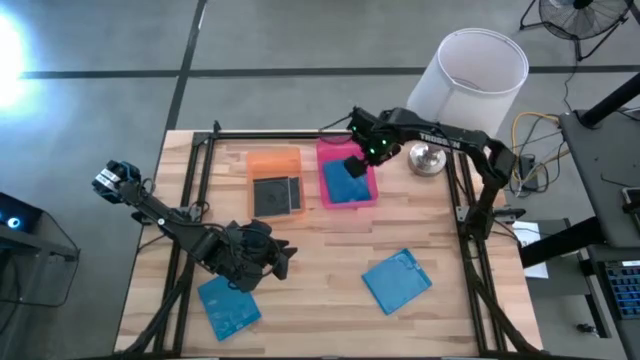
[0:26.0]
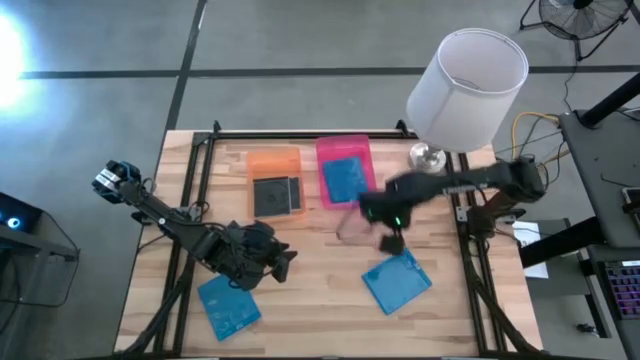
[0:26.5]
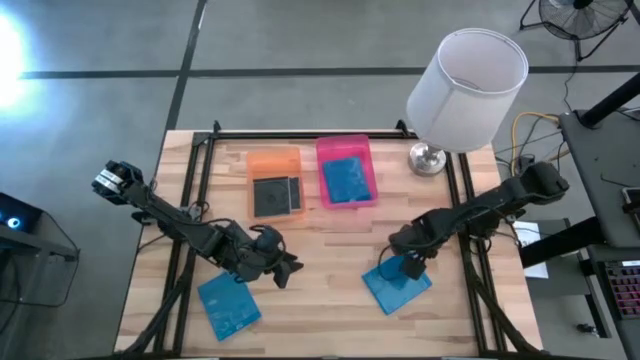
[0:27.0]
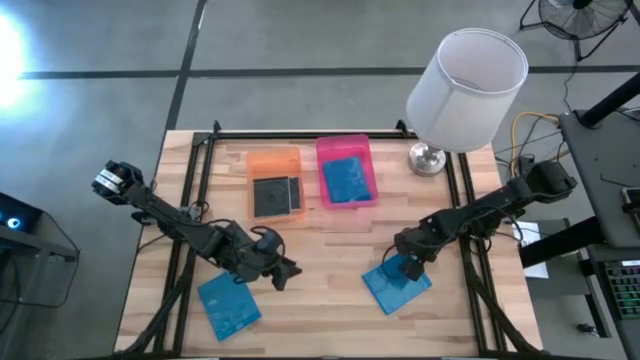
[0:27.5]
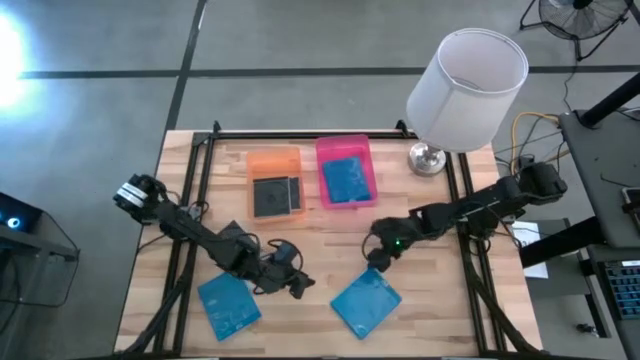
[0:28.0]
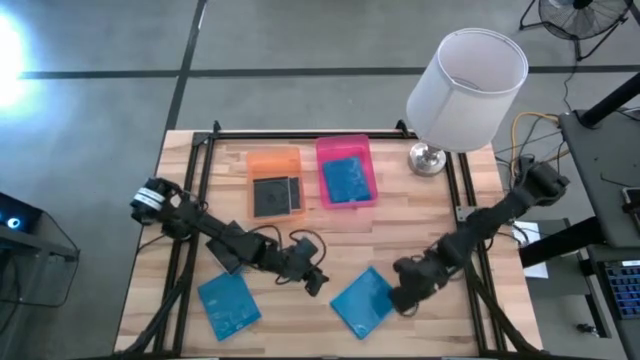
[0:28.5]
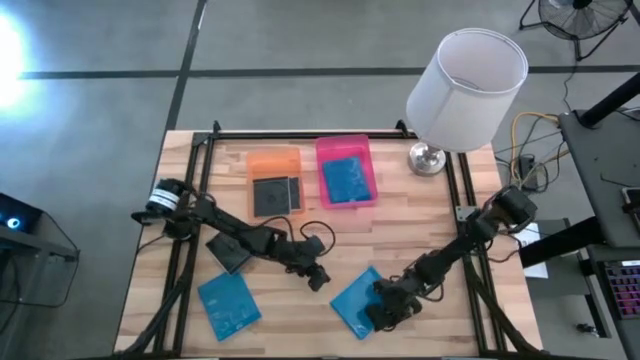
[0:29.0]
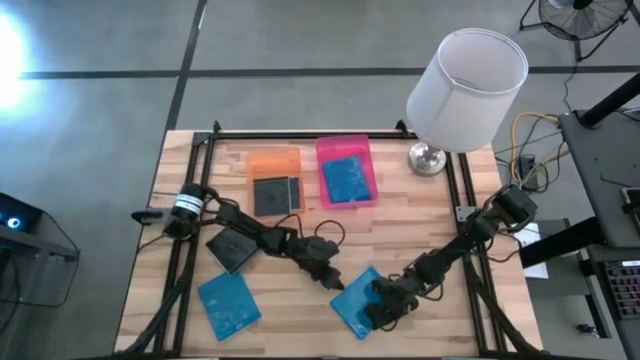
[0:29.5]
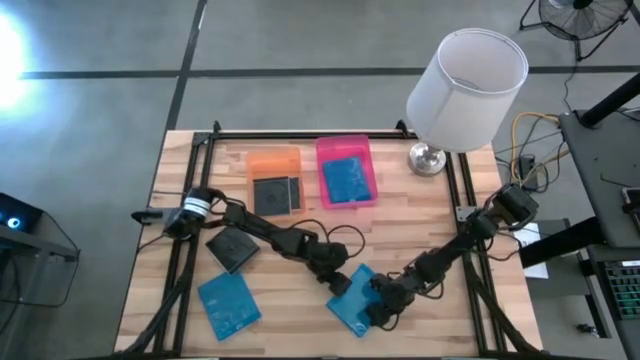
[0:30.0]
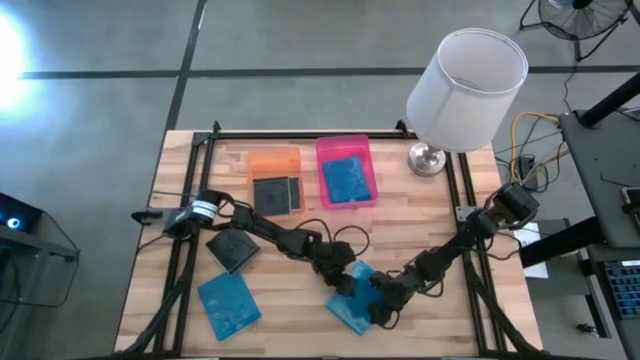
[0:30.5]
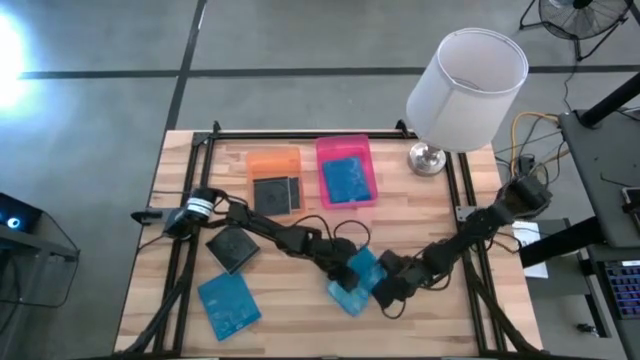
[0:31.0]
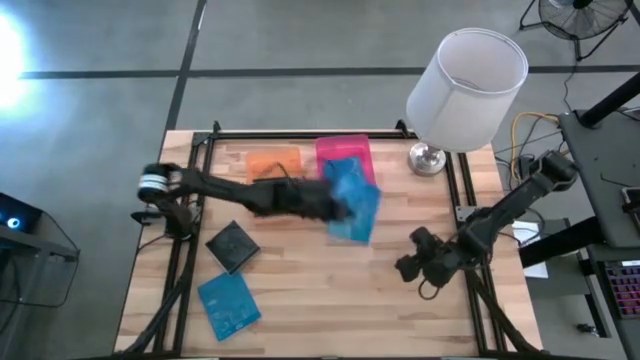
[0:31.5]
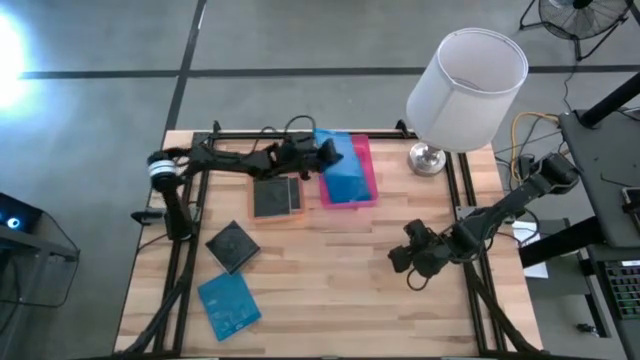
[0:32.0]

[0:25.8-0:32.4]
Task: Pick & place jewel cases by type
Put the right blue CD case into the pink bin

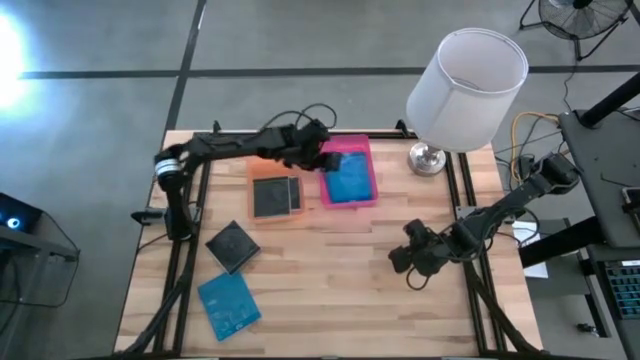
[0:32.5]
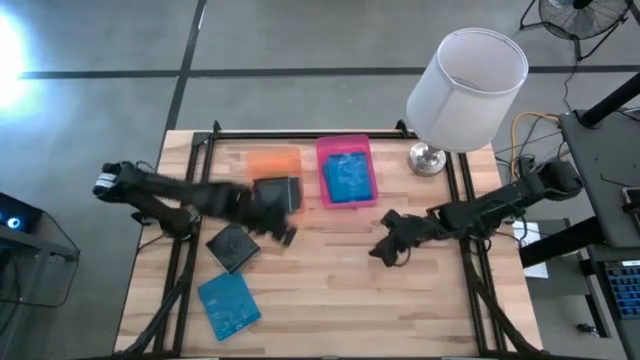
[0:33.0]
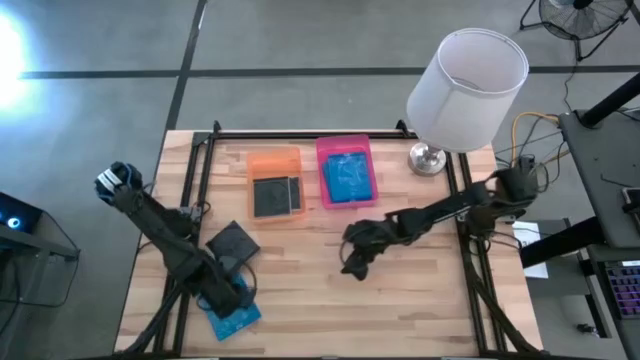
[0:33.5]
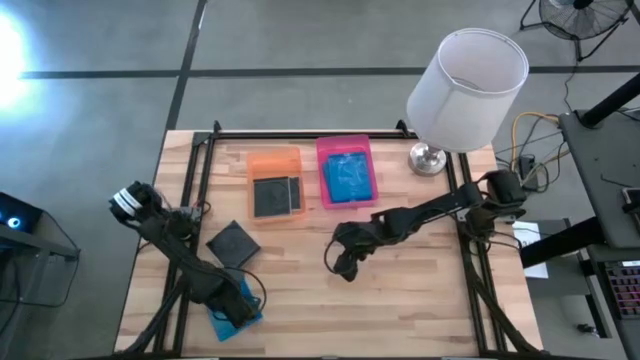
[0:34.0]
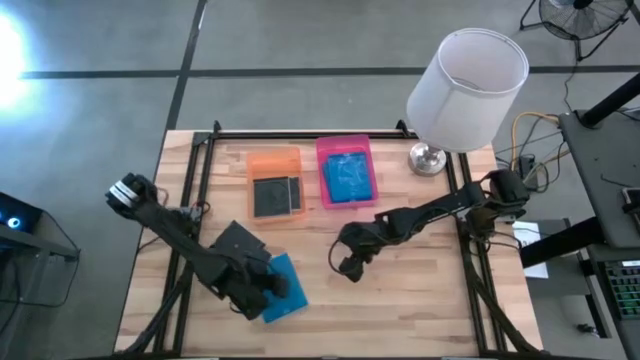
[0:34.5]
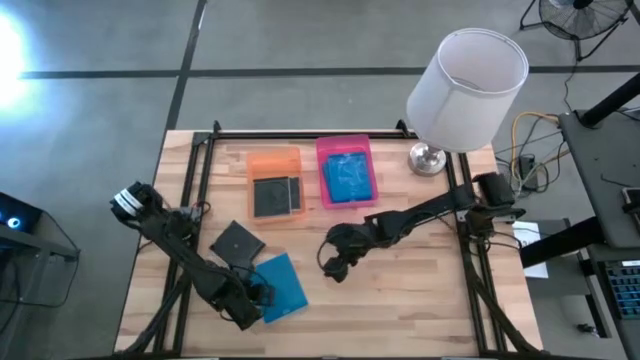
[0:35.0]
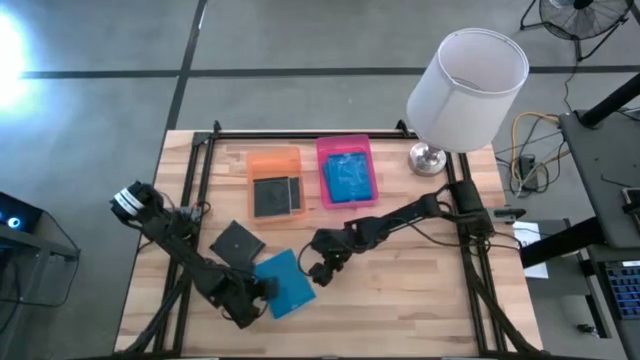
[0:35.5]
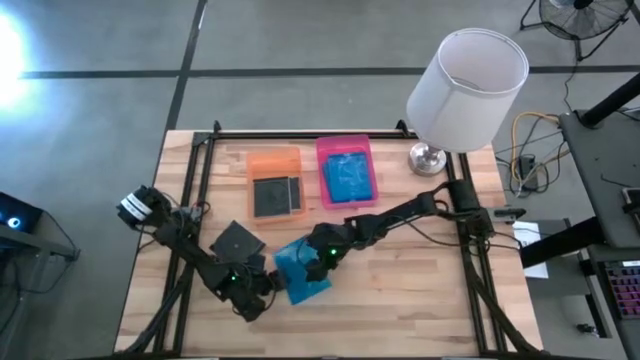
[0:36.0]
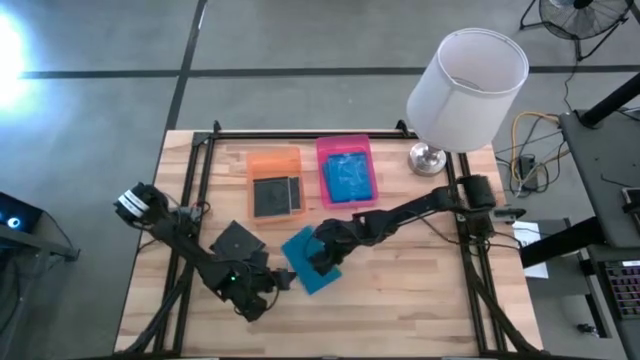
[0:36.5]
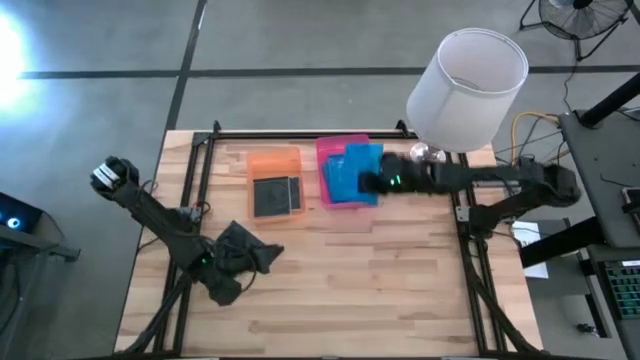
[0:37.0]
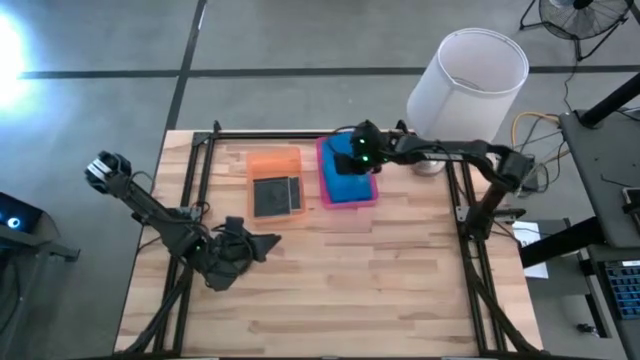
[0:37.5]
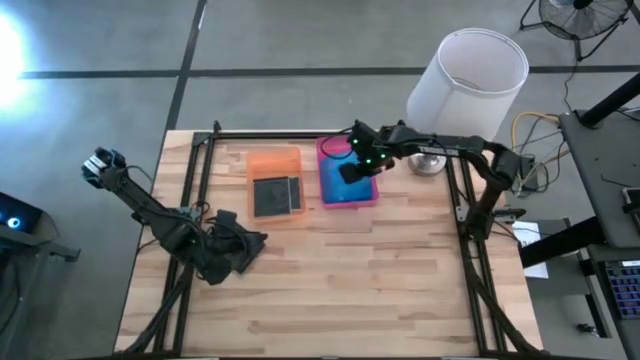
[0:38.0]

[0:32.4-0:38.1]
Put the blue CD case into the pink bin

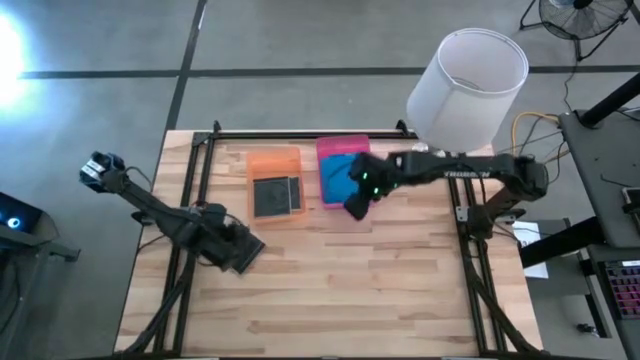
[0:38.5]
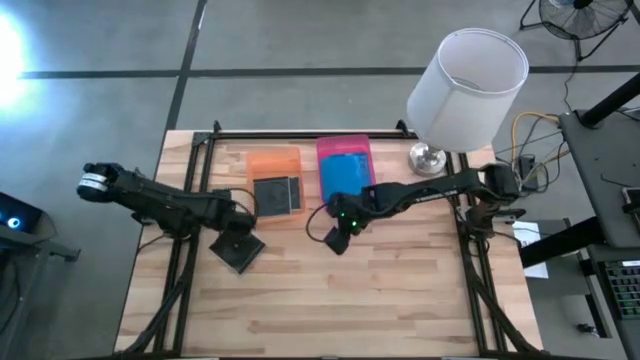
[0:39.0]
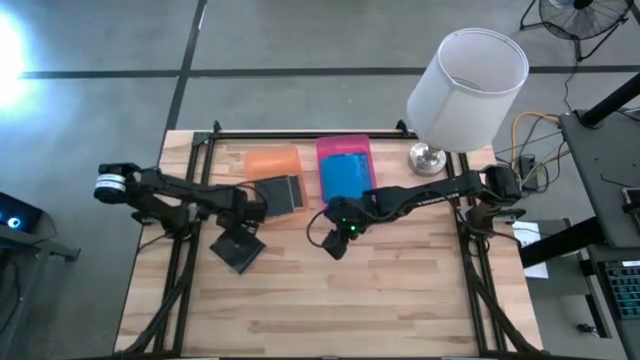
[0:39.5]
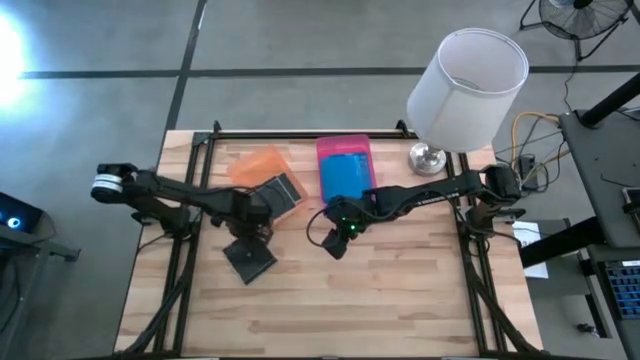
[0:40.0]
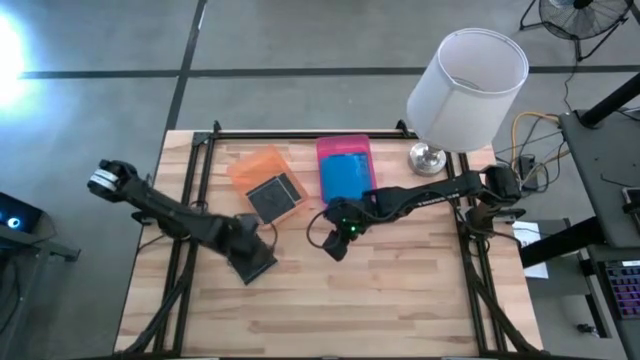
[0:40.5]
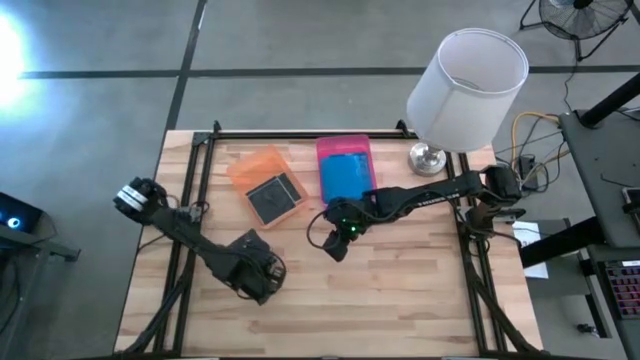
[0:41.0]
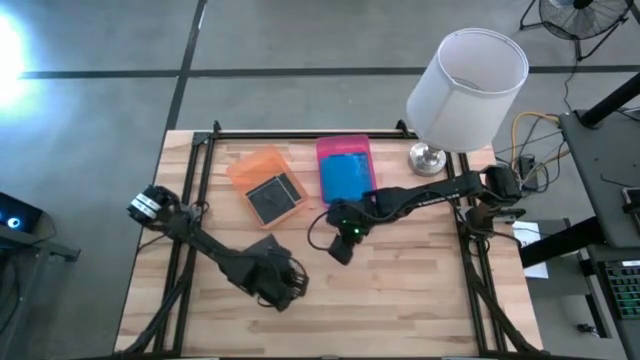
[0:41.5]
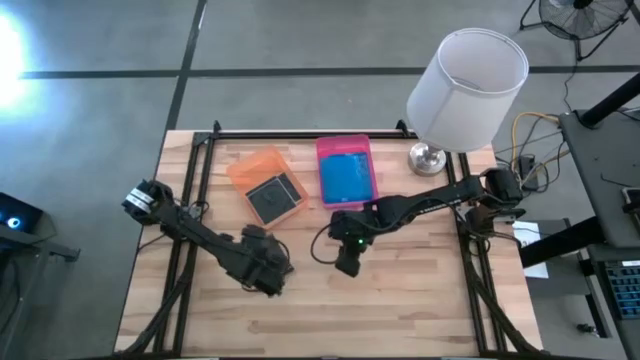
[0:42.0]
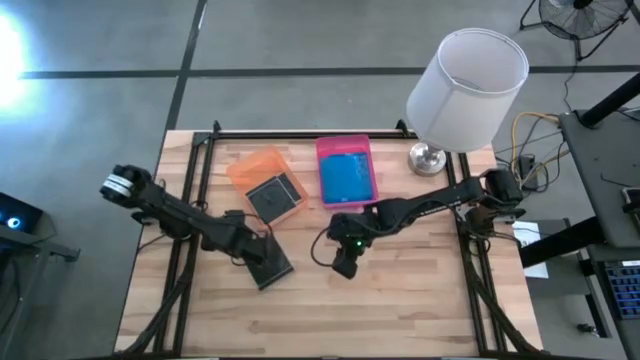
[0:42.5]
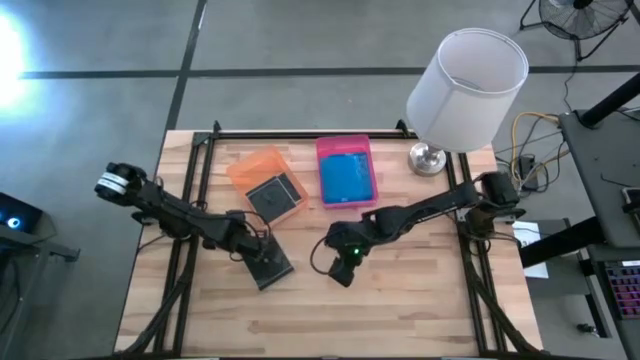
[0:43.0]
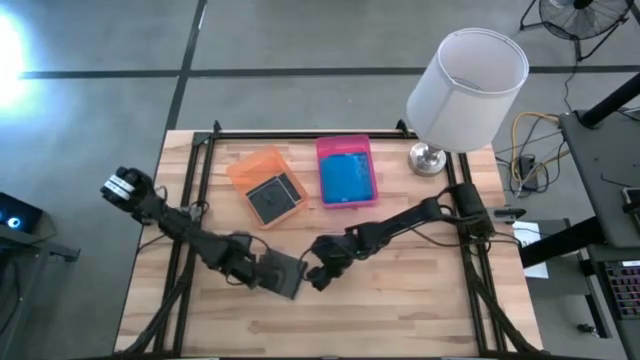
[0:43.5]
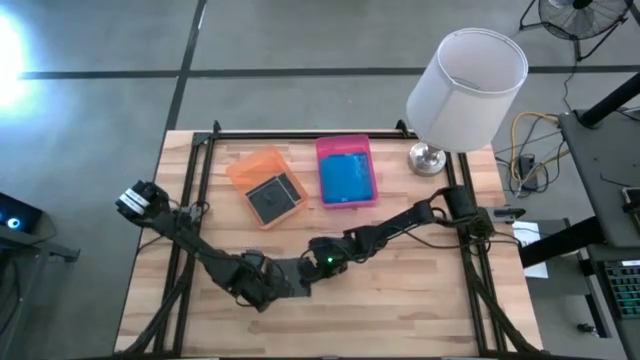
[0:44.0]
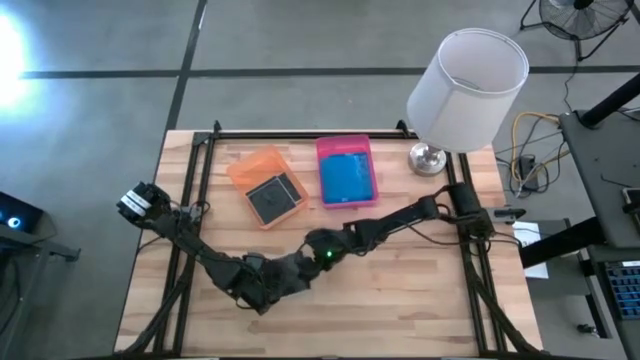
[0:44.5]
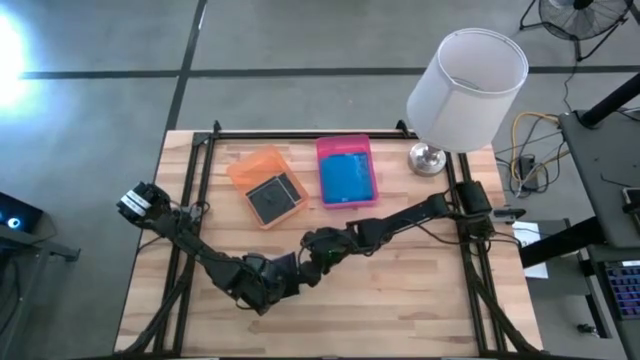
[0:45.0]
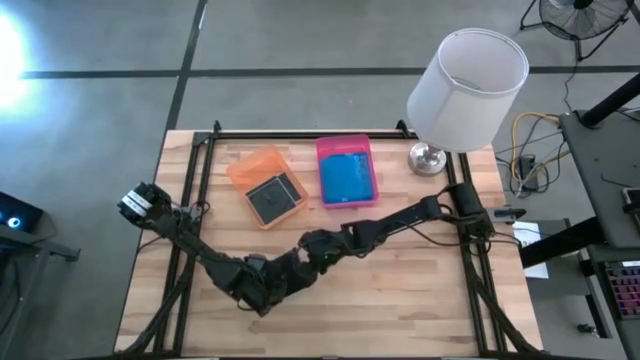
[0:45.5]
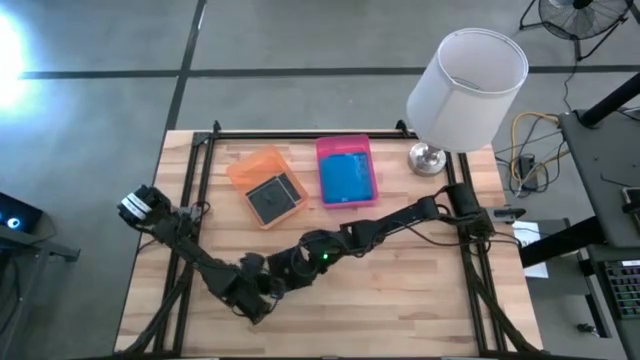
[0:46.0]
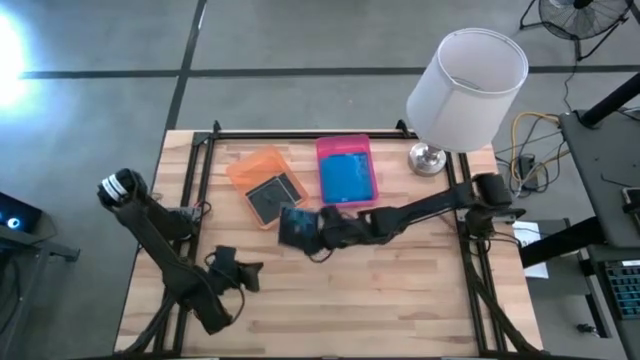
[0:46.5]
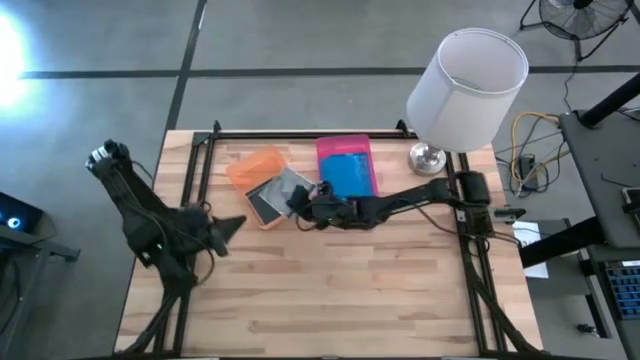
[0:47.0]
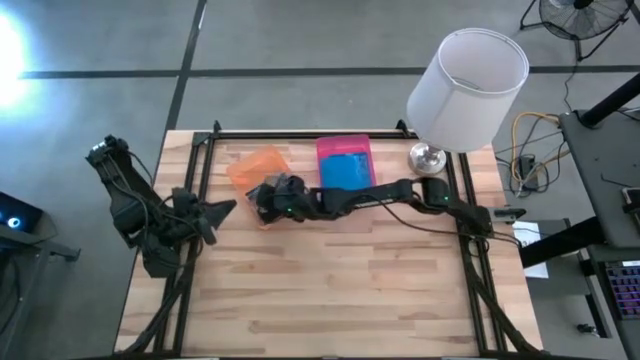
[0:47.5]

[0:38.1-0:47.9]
Put the black CD case into the orange bin
